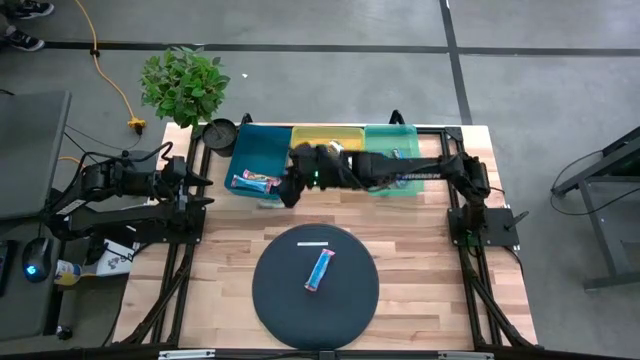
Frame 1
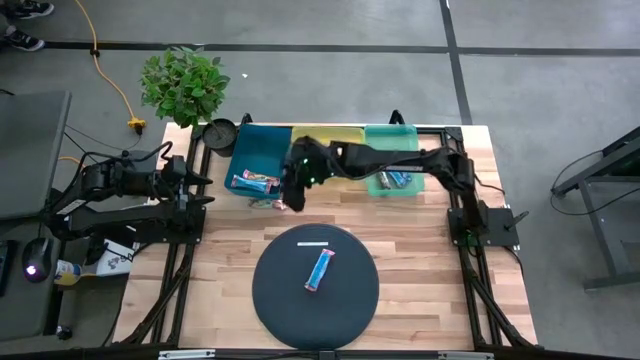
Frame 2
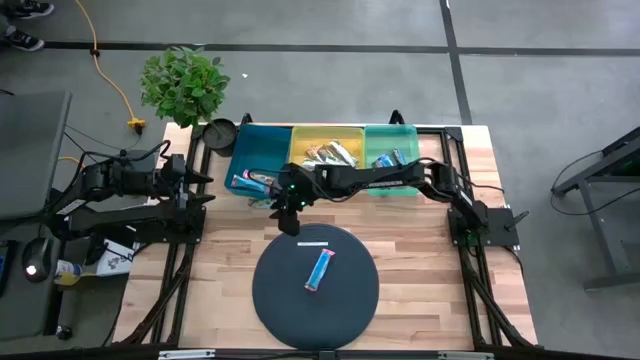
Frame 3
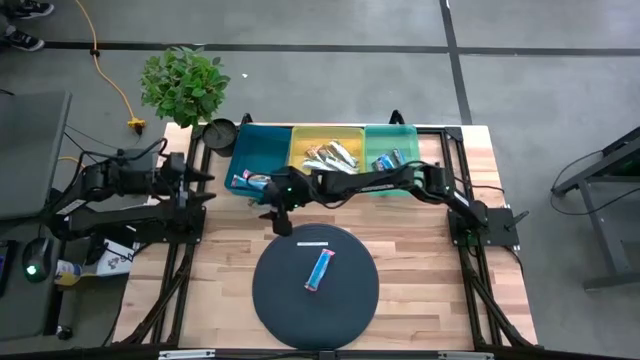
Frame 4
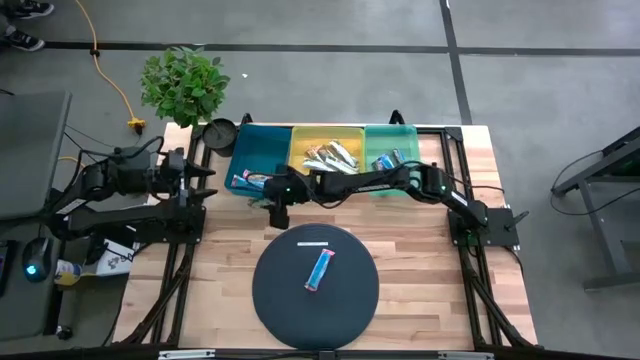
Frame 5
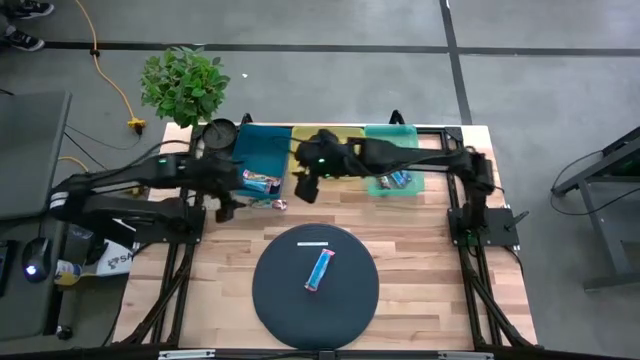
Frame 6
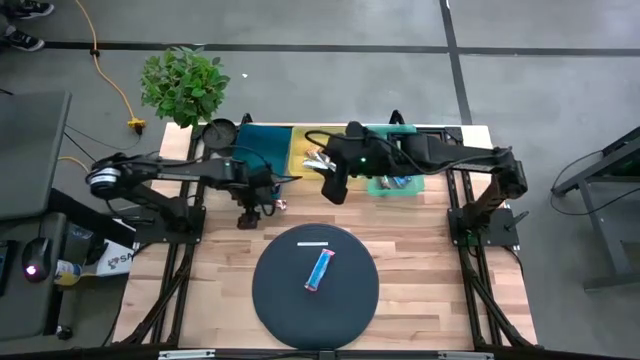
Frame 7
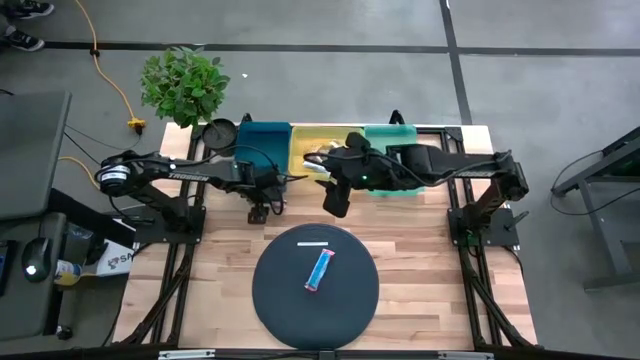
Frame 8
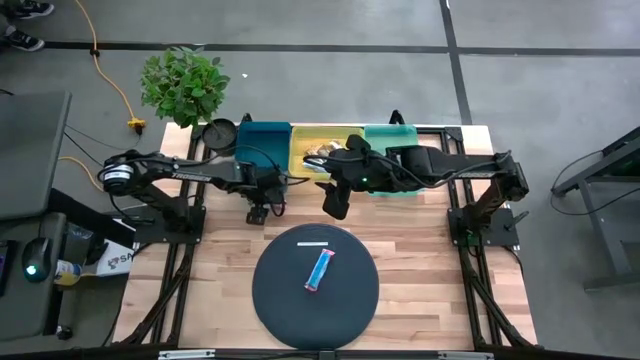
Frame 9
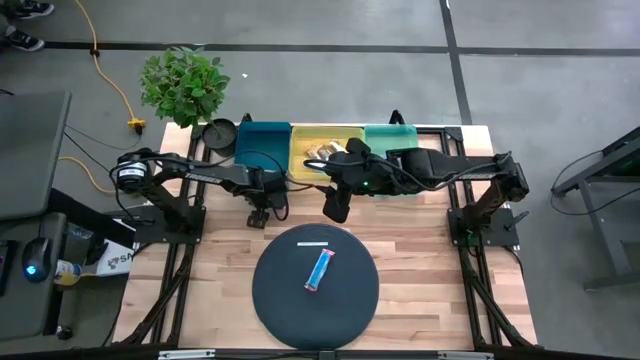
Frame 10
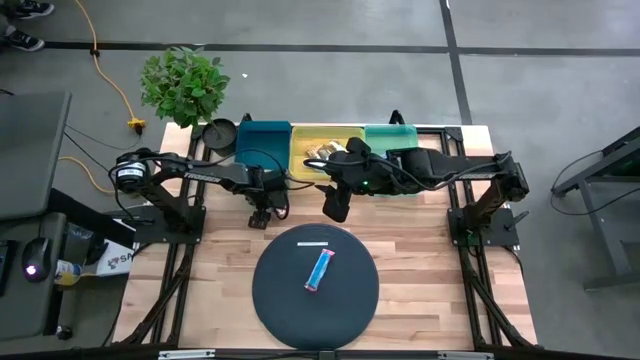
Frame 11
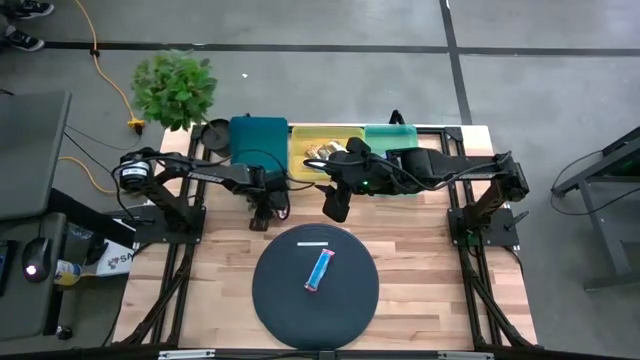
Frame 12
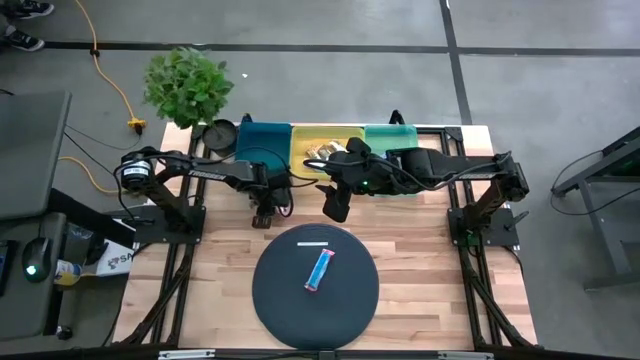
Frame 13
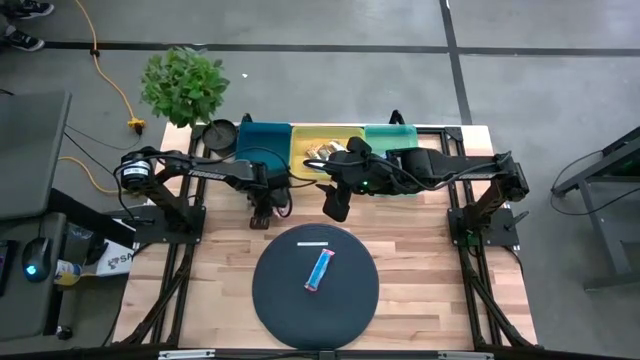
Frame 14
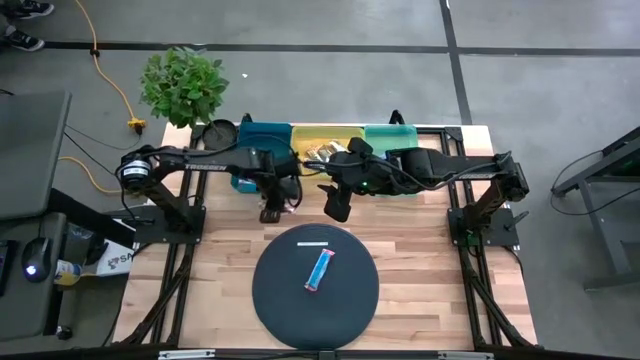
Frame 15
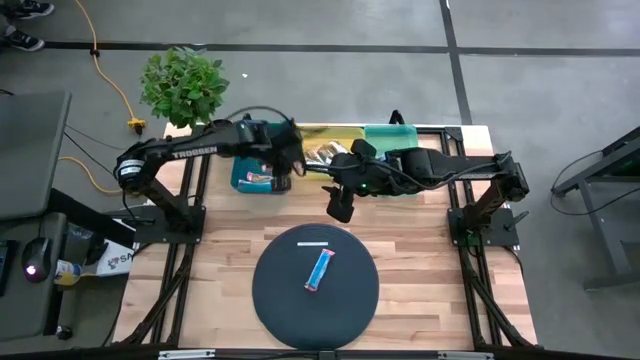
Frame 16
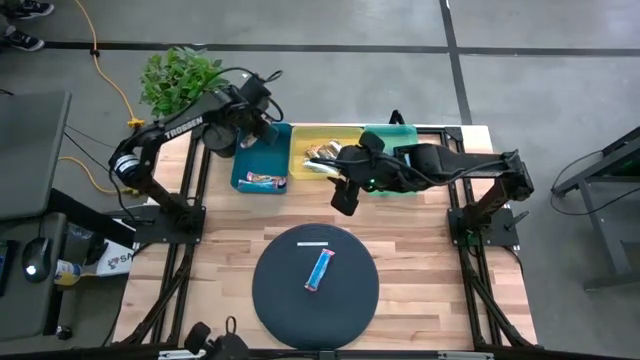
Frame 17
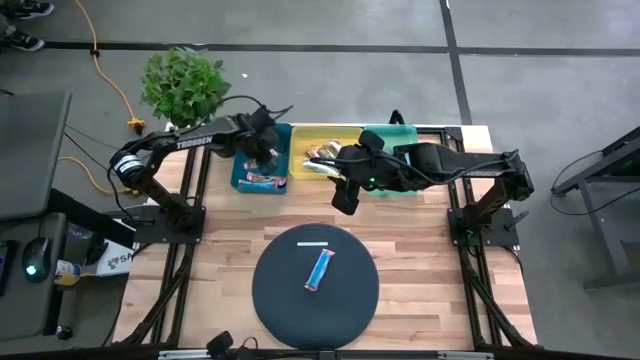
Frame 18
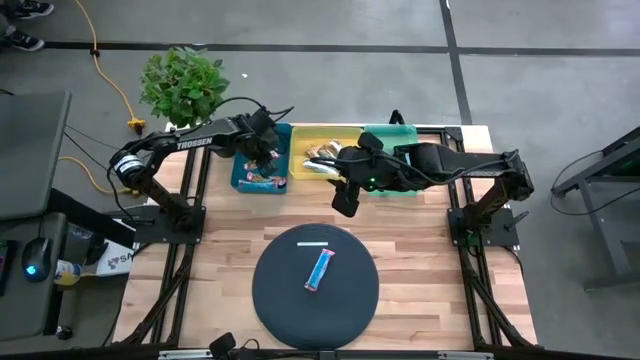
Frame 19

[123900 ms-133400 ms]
Task: Pick and place Granola Bars by type
Put the red granola bar into the blue bin

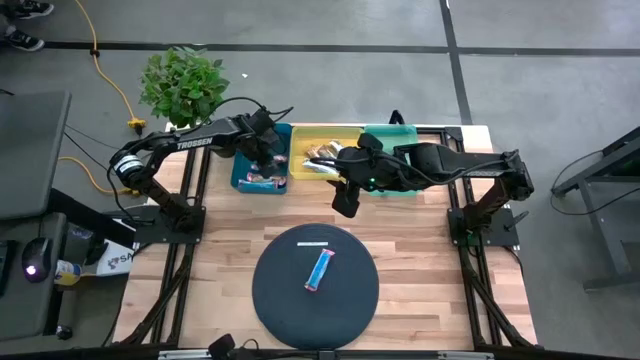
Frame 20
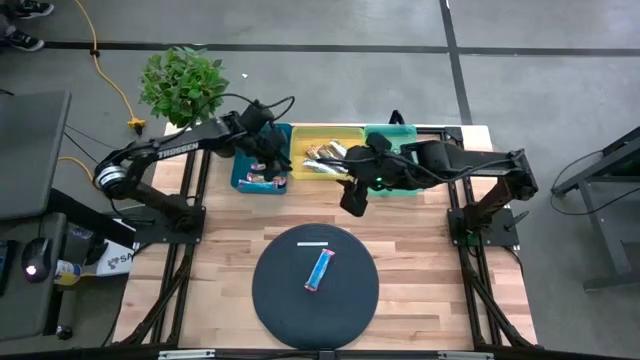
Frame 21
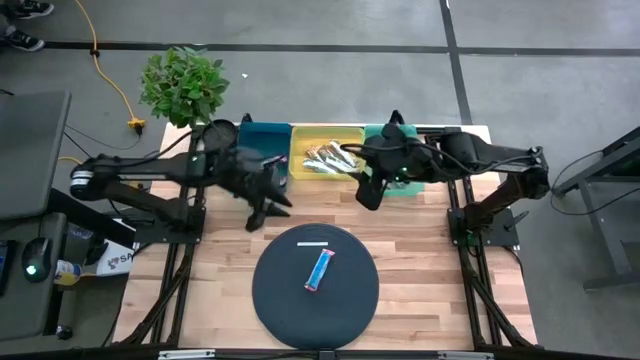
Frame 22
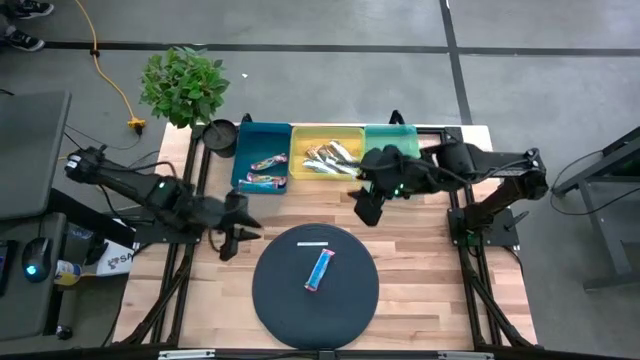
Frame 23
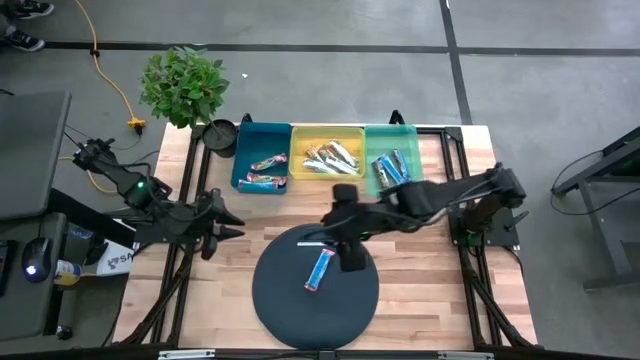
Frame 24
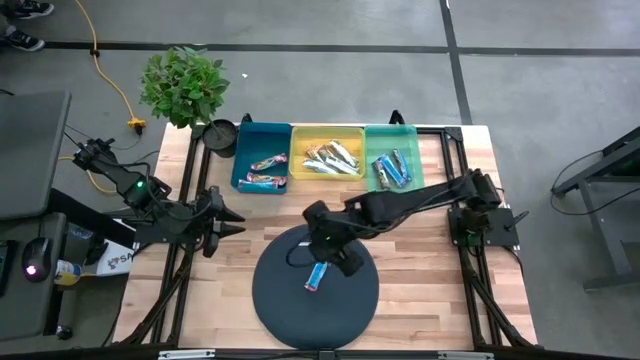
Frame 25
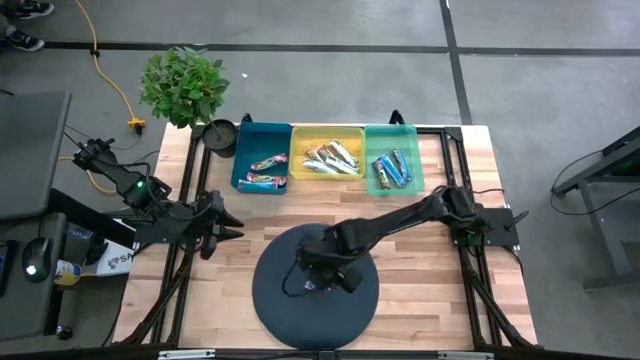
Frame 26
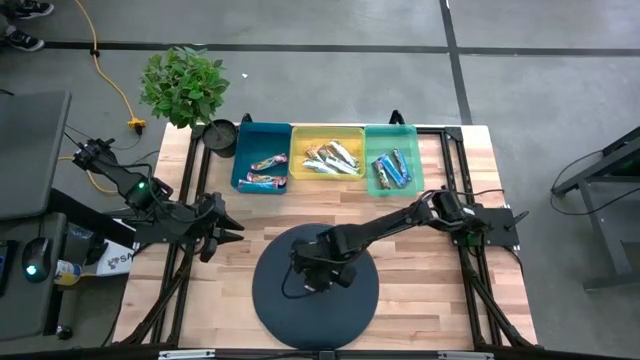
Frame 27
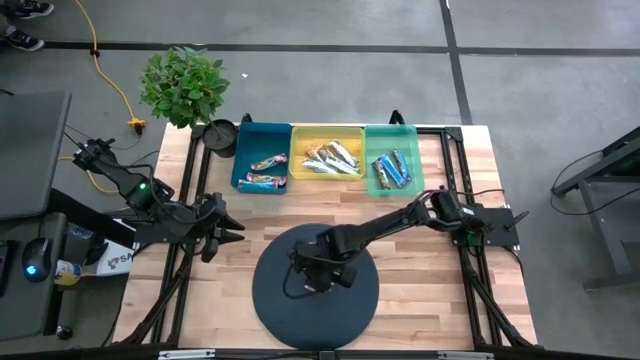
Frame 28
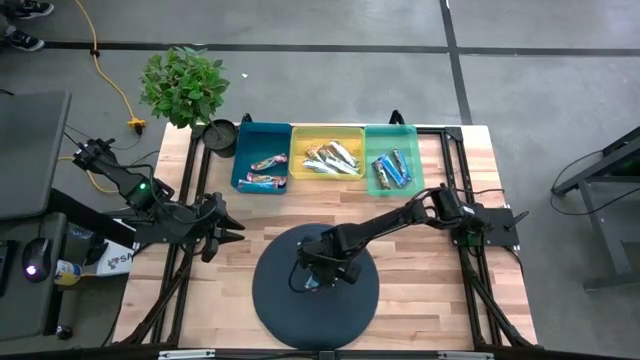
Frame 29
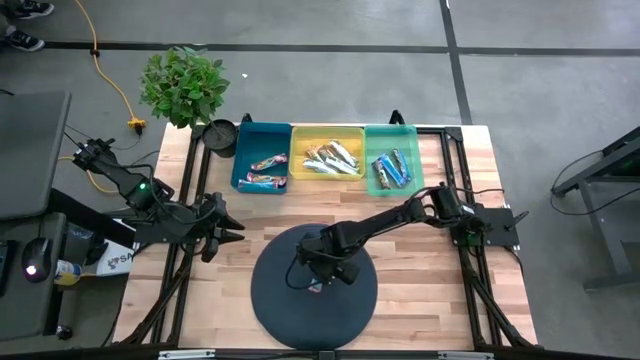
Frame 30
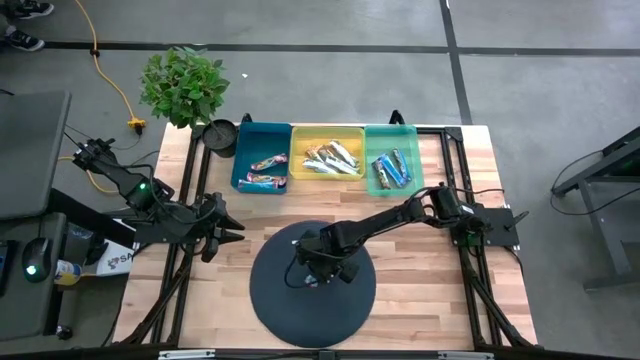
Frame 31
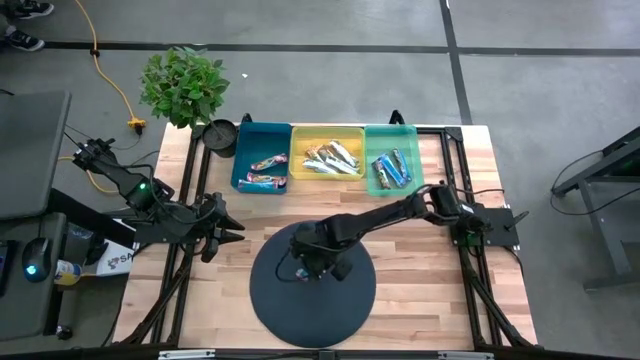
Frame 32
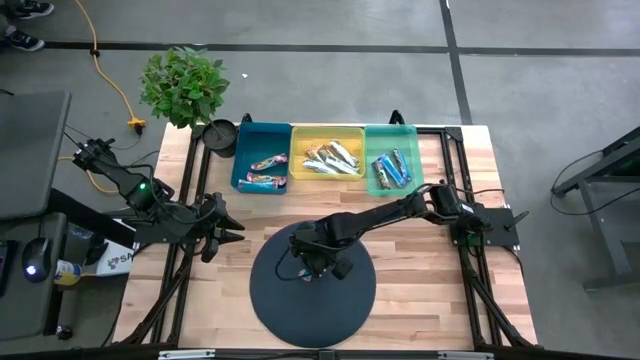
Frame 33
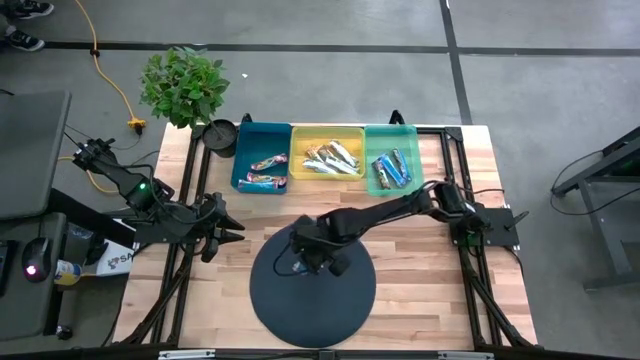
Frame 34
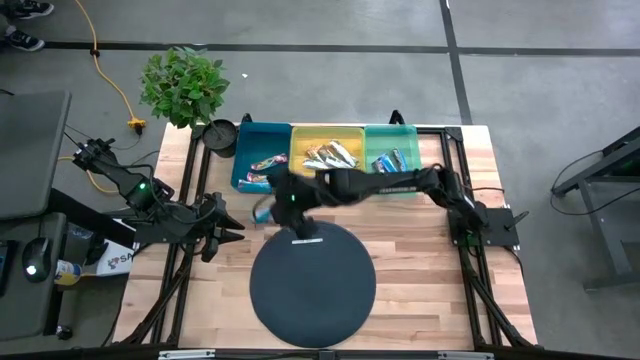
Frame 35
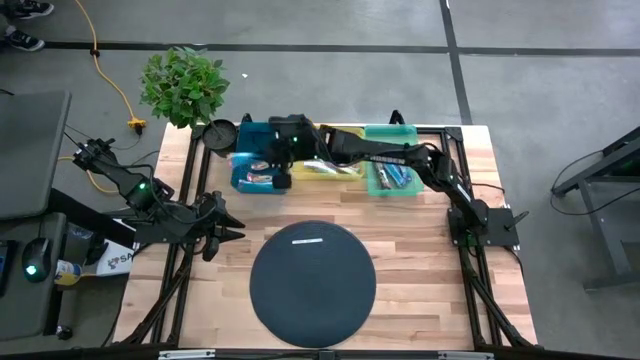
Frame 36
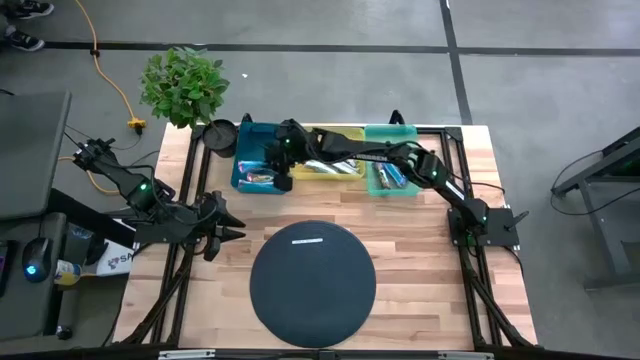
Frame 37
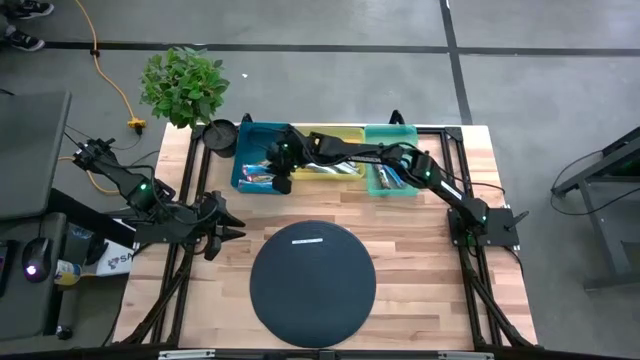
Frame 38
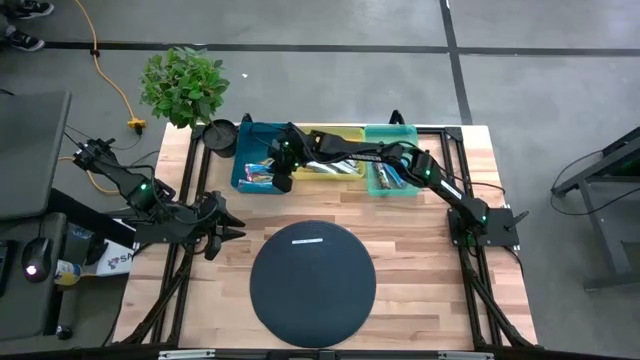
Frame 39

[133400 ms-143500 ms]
Put the red granola bar into the blue bin

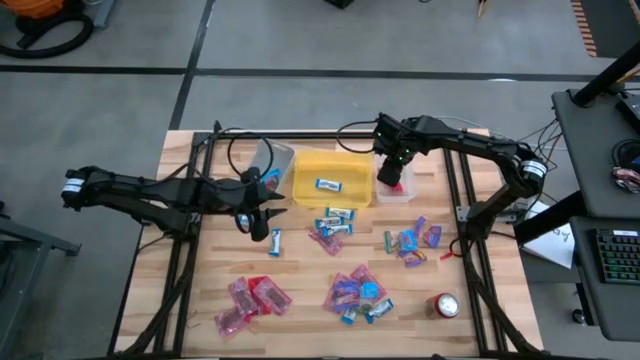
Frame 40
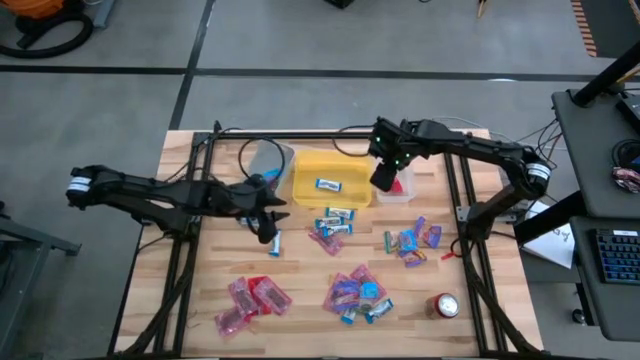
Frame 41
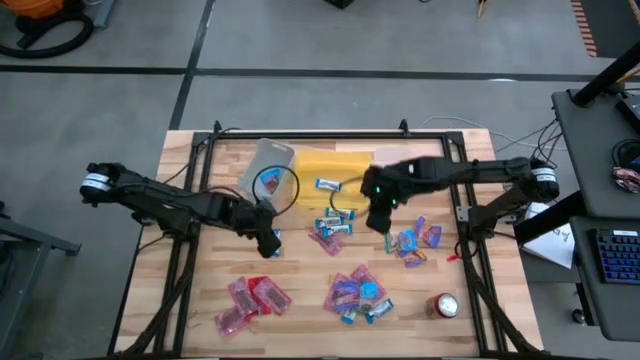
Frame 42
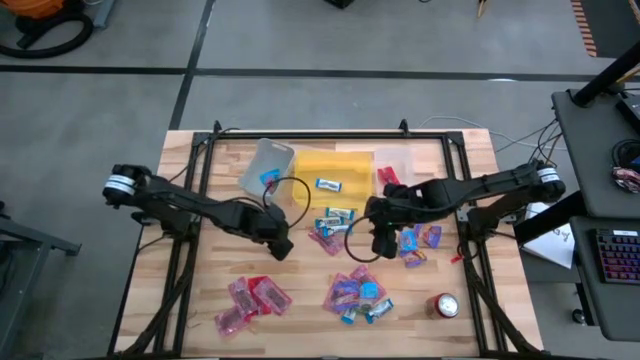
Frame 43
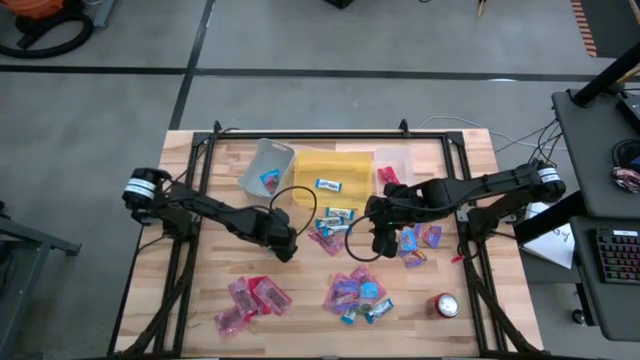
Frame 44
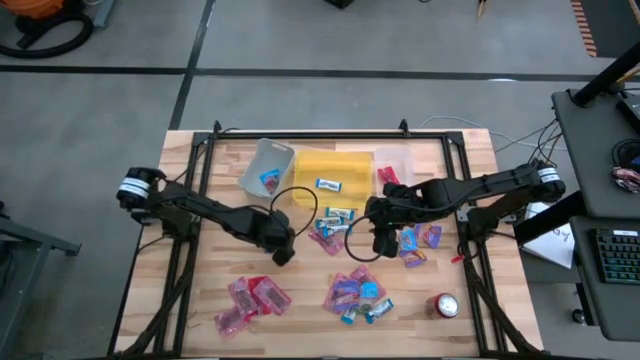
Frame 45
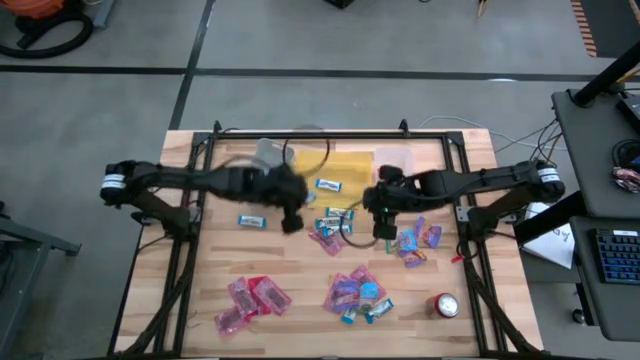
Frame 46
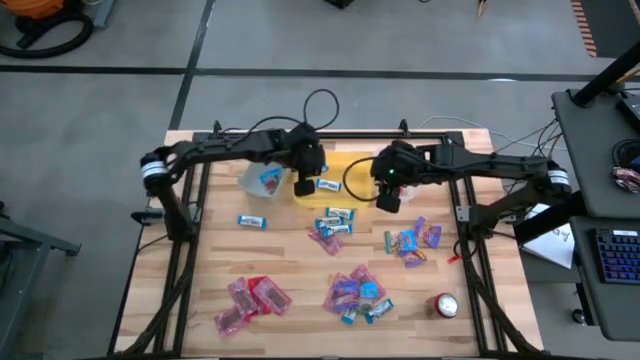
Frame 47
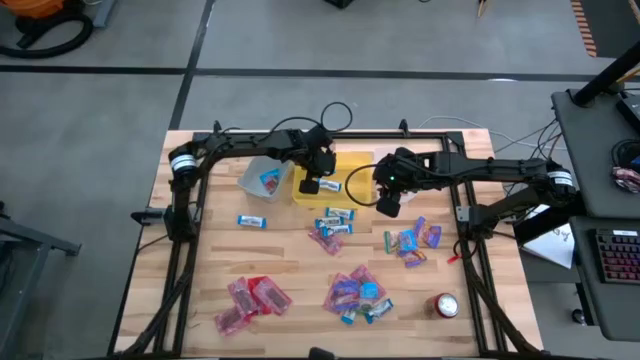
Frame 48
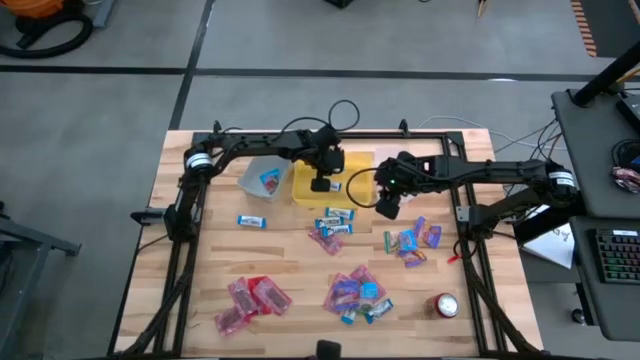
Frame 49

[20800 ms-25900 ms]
Task: Sort candy
Put the white chocolate into the yellow bin
